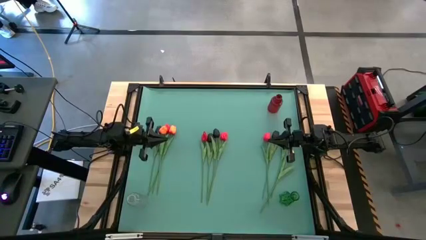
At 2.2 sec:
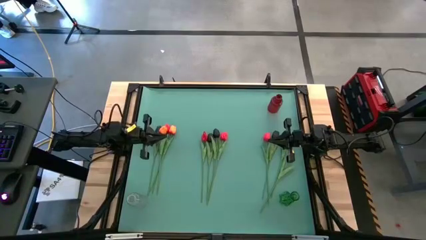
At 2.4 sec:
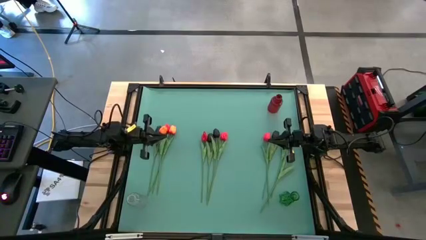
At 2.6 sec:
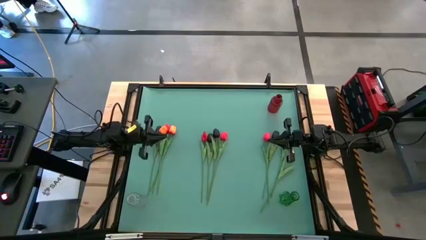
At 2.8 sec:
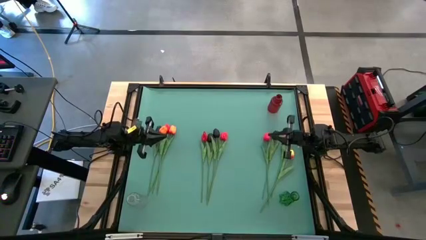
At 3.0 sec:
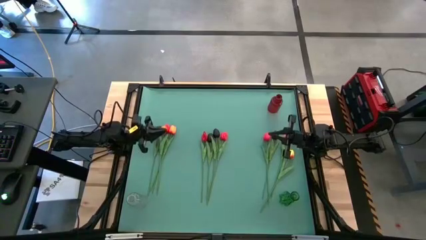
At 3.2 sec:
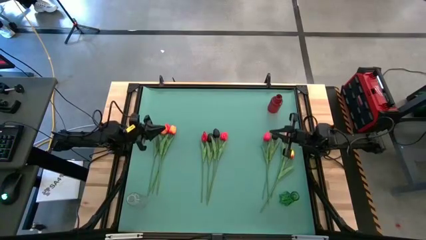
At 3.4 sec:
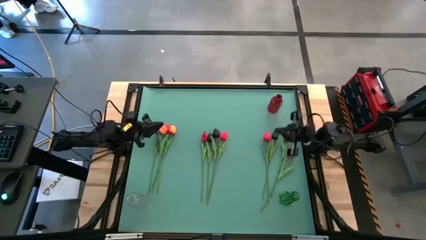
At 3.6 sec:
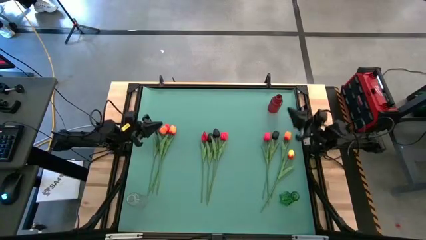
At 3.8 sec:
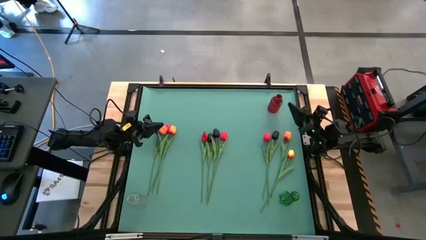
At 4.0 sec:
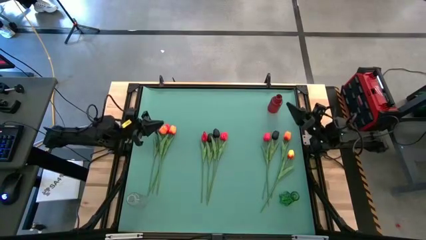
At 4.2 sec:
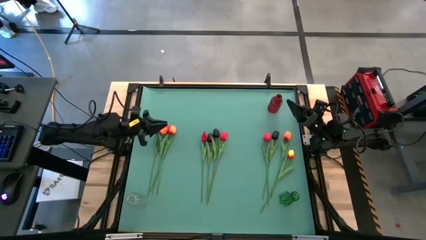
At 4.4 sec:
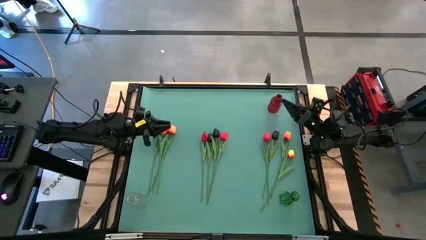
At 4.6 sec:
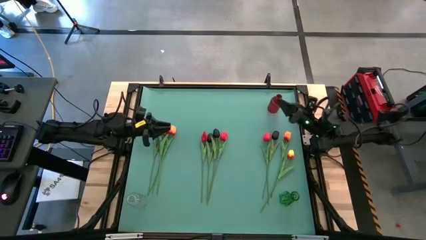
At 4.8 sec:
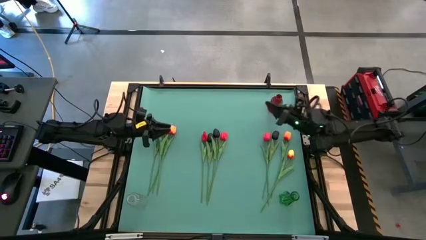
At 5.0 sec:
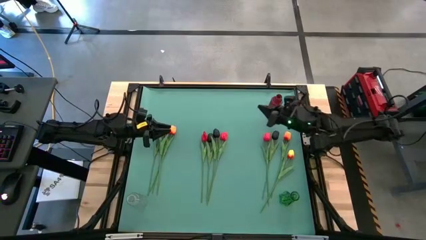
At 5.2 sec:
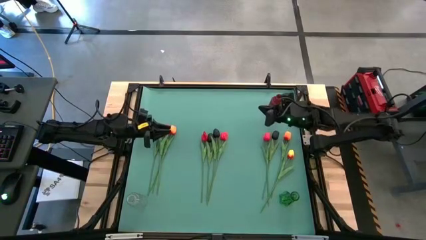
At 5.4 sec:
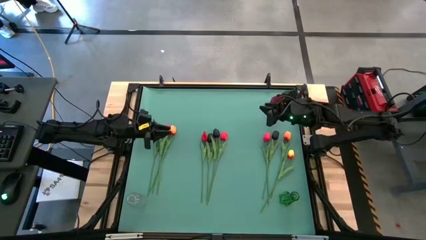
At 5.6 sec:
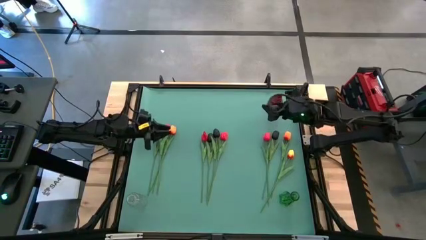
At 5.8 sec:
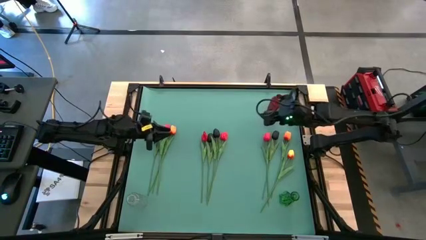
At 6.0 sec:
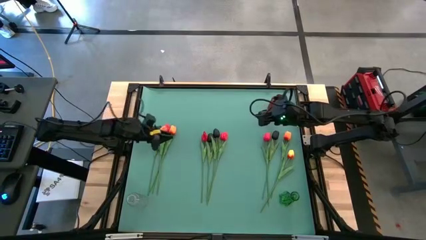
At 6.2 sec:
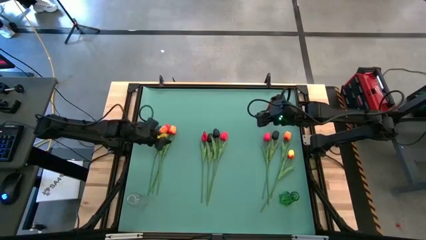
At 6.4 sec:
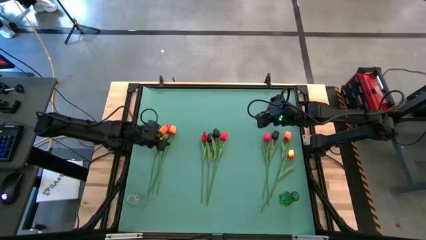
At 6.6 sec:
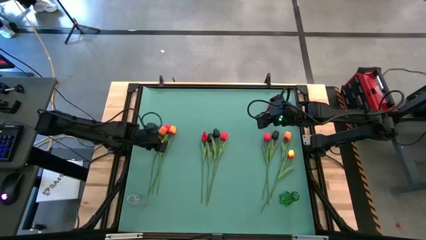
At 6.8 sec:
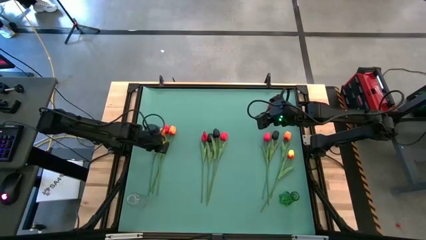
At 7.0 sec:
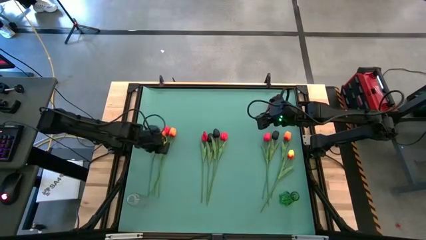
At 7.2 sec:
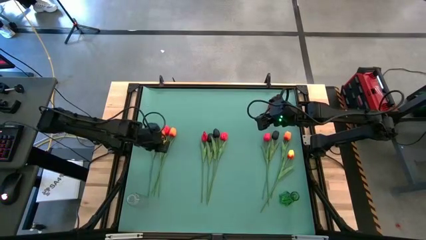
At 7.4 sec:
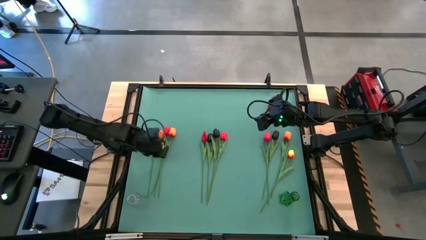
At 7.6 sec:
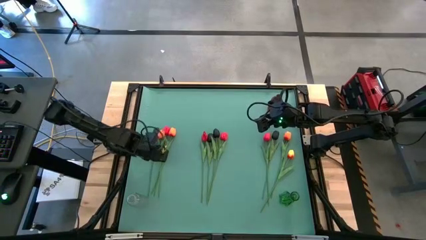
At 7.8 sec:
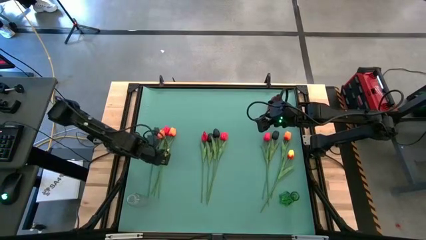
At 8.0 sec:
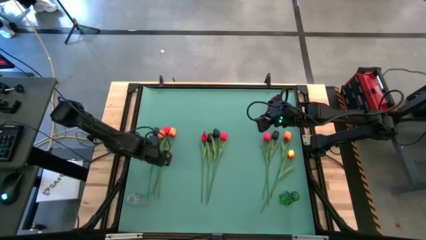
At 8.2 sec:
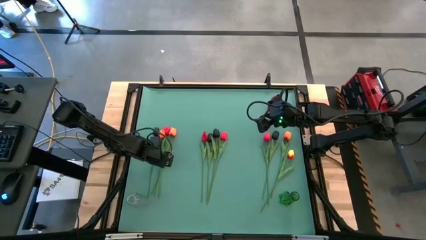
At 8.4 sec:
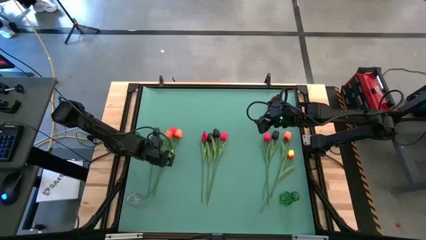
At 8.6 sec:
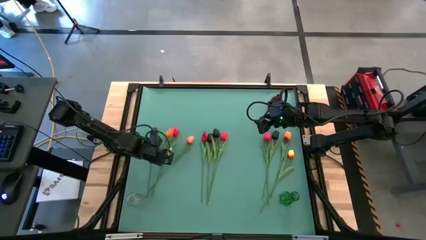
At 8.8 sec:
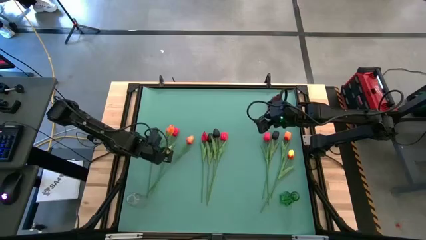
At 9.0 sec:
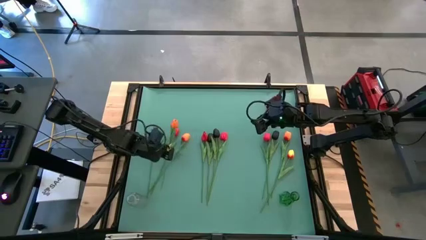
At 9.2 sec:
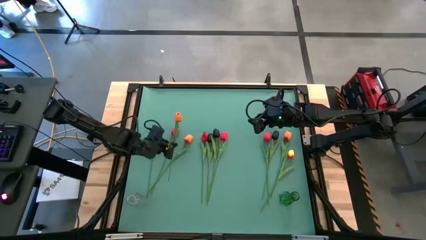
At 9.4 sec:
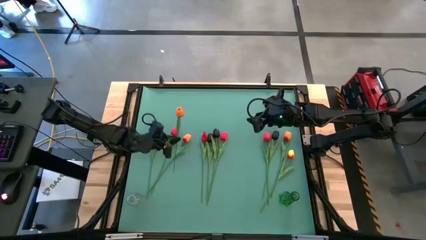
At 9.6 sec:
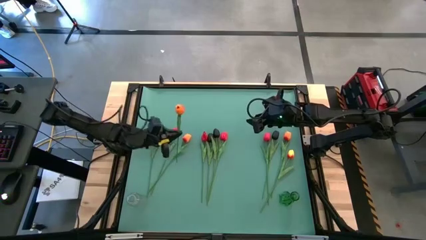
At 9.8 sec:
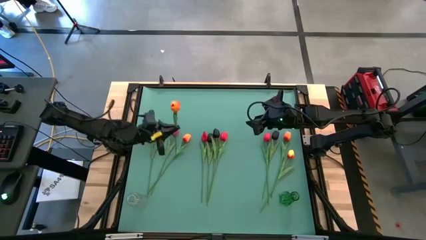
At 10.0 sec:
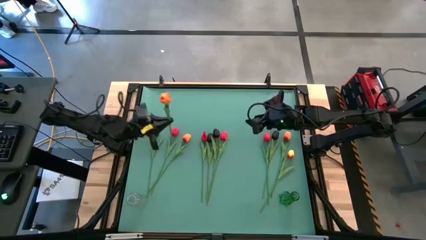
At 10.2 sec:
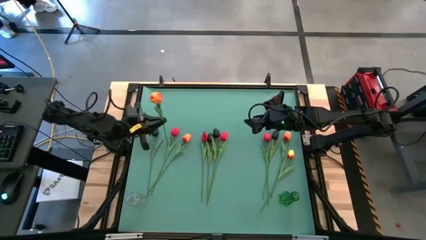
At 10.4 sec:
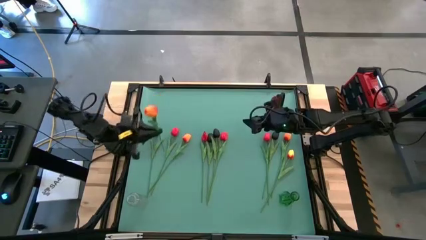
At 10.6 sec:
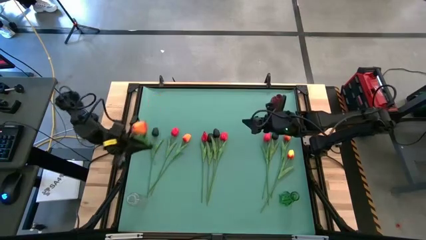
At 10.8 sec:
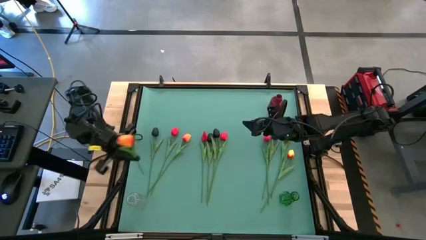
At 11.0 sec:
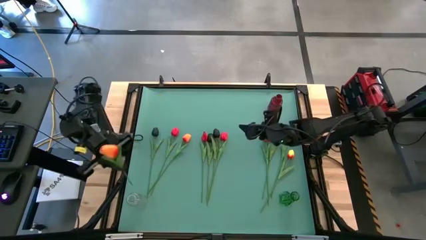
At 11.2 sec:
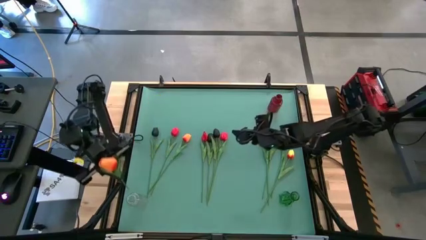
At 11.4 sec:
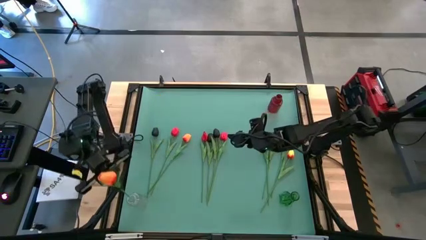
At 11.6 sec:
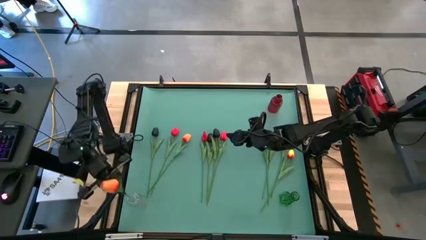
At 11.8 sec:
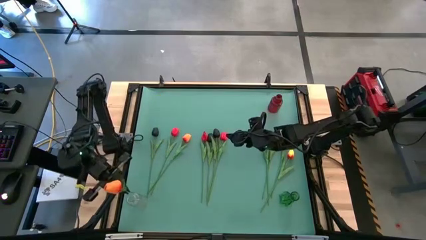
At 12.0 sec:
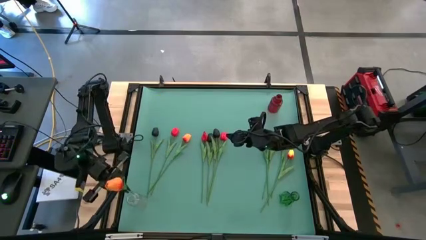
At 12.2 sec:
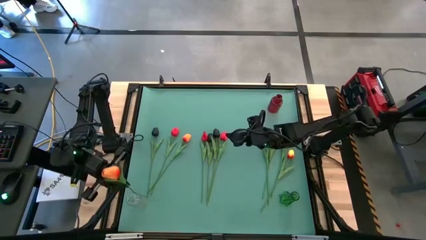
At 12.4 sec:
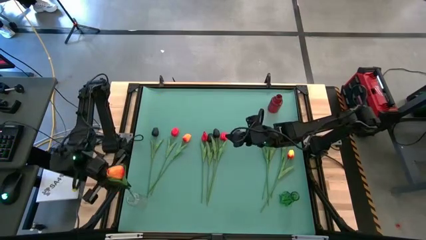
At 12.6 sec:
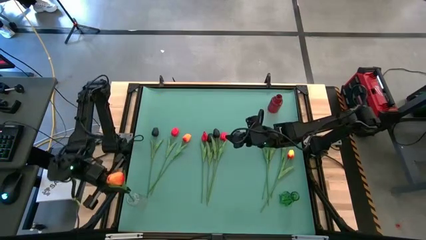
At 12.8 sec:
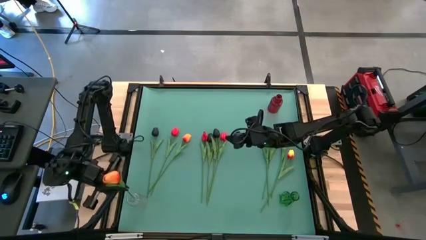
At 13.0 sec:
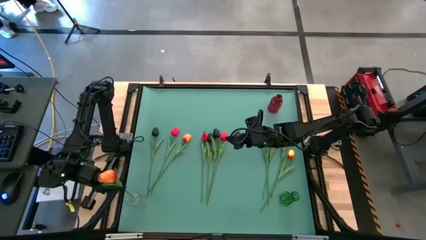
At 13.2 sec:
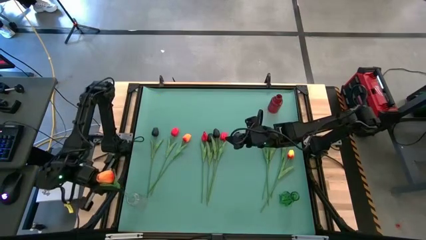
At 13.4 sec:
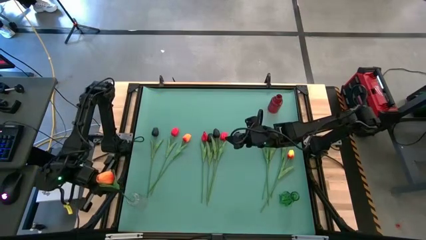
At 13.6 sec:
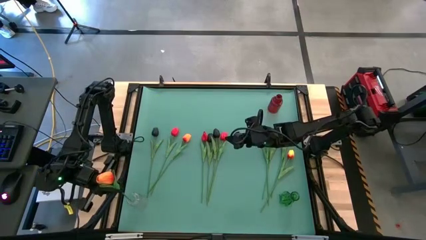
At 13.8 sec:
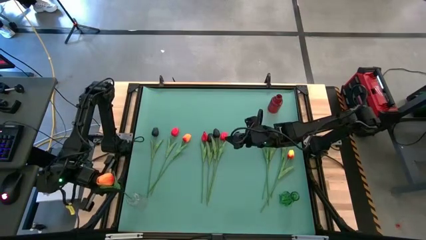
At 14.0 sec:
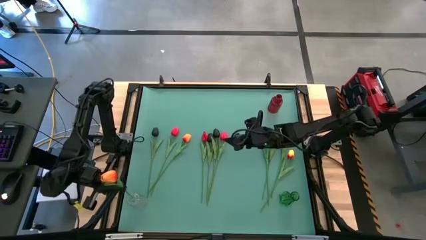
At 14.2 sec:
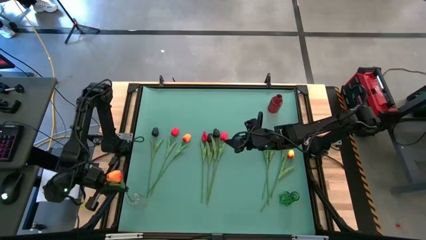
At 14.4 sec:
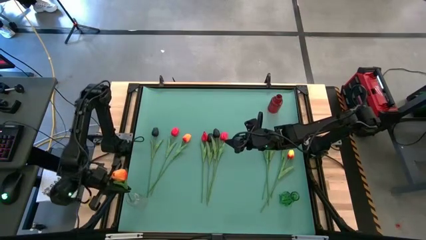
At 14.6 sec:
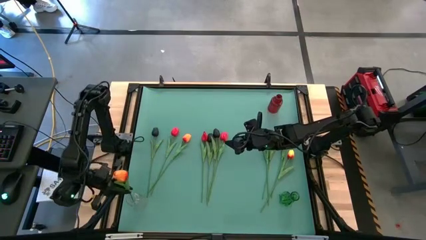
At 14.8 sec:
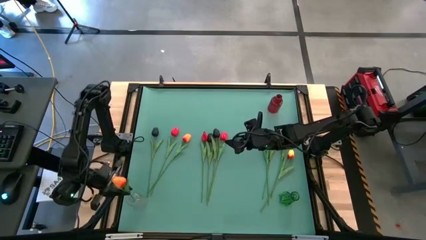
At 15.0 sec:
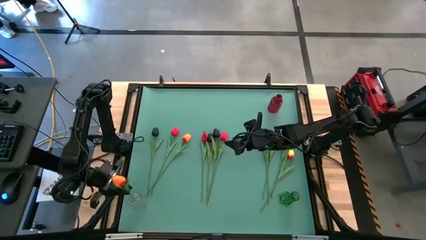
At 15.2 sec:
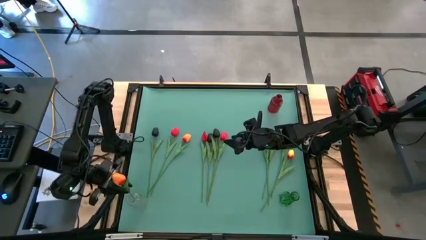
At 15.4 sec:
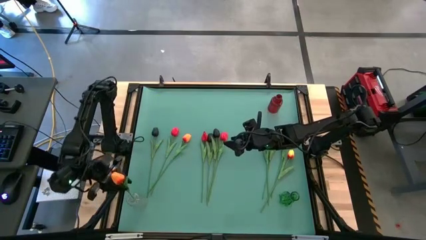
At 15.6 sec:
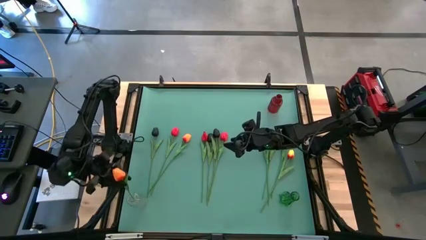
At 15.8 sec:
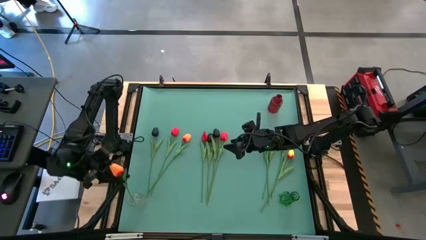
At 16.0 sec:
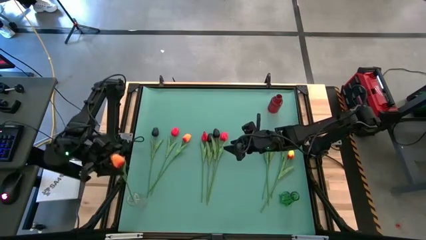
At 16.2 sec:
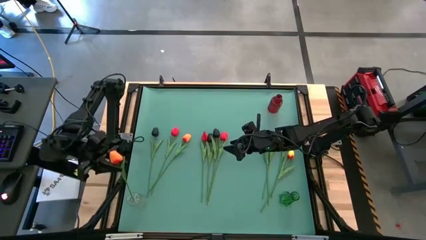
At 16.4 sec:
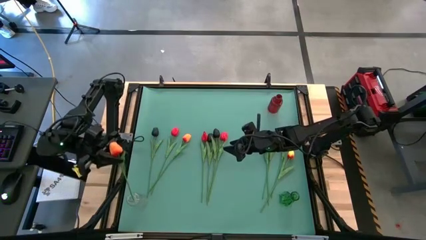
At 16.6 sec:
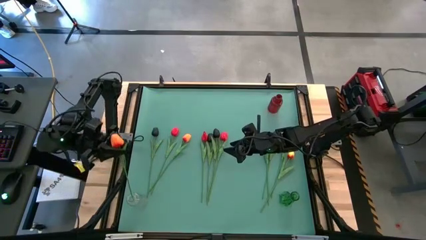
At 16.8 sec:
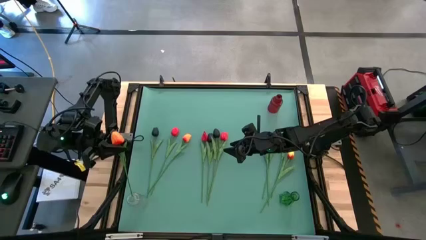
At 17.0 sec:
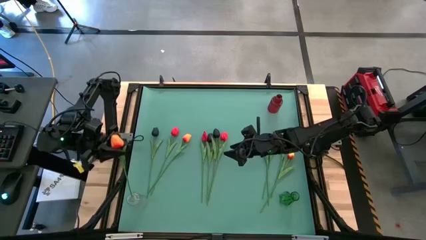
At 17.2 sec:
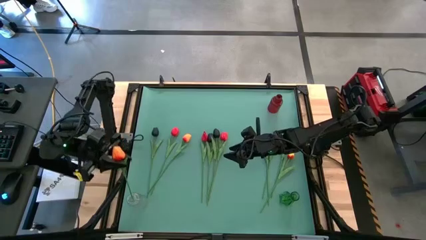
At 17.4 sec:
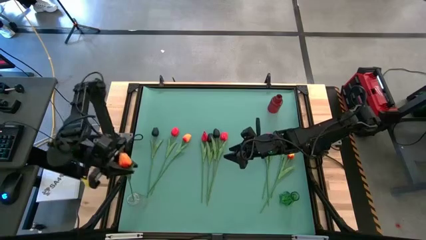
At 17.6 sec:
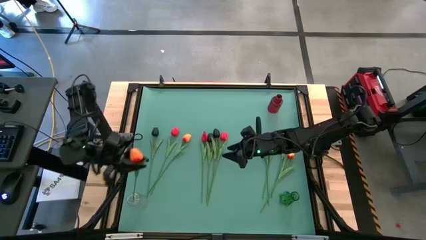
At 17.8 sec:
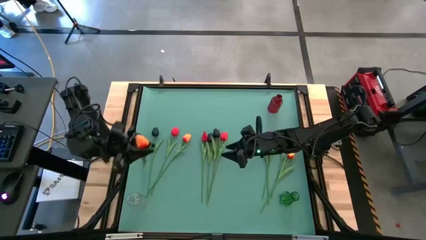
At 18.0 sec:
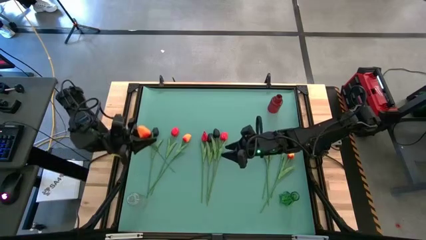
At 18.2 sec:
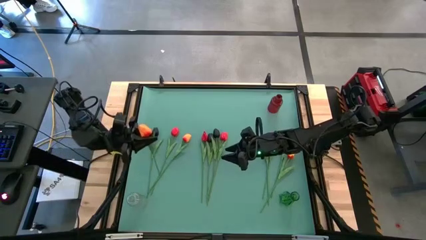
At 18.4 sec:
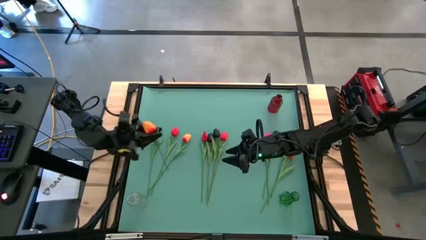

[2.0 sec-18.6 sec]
Task: Sort flowers into vase by color
Put the orange tulip into the transparent vase
